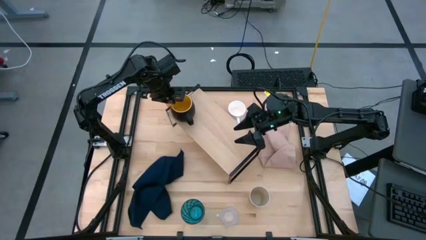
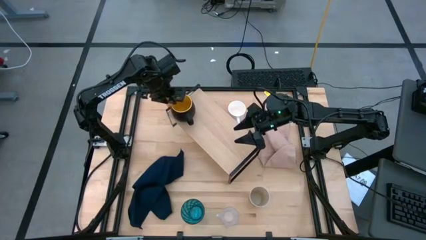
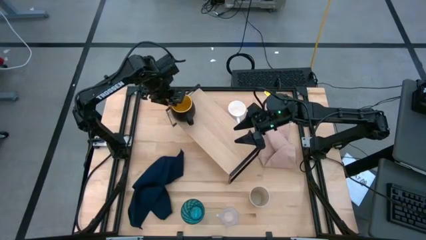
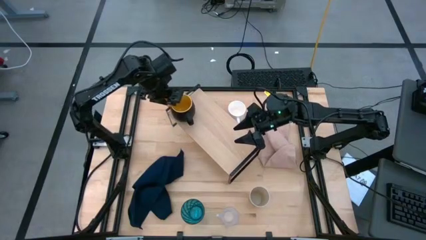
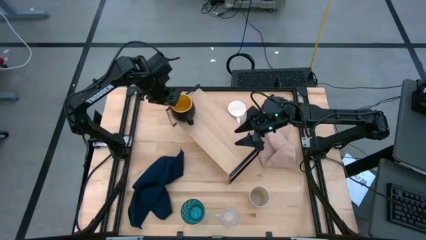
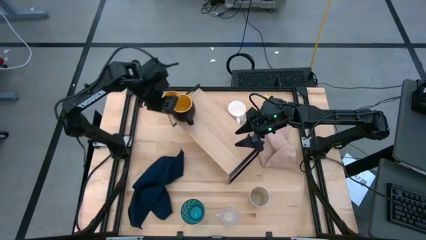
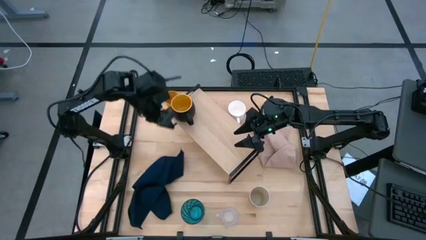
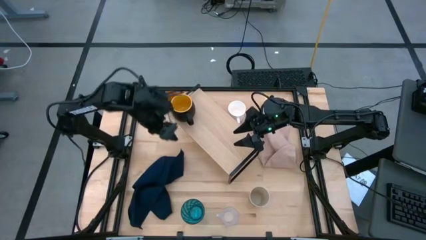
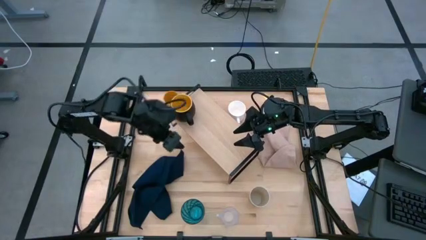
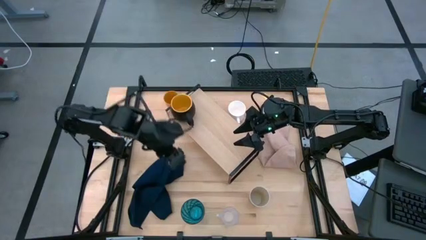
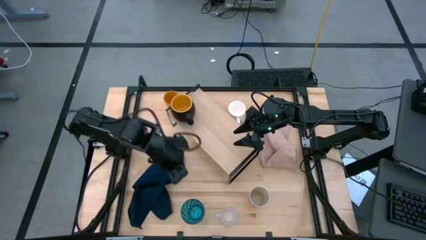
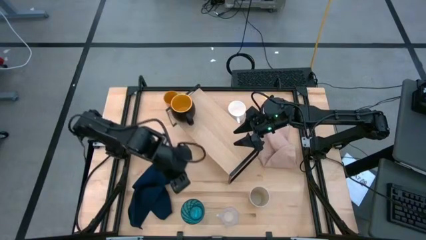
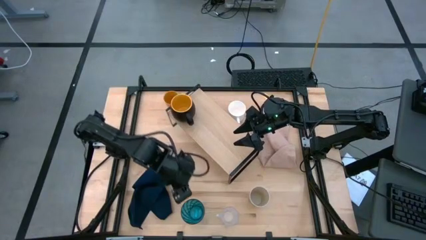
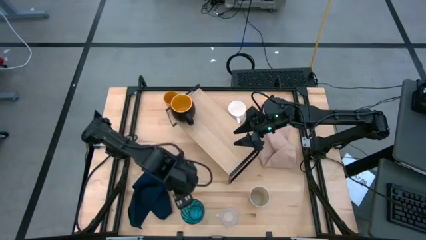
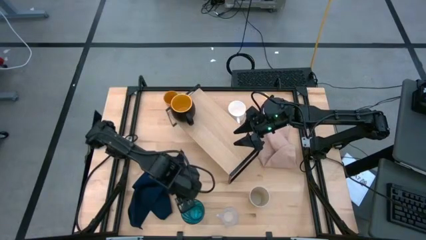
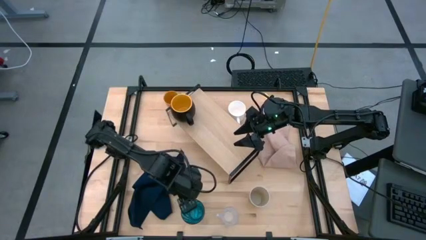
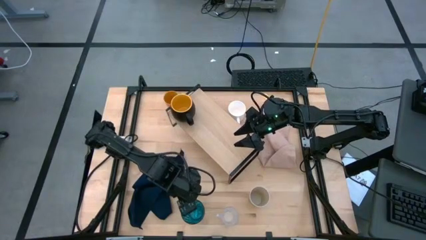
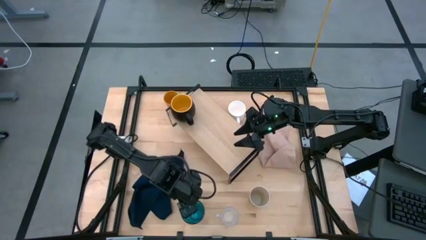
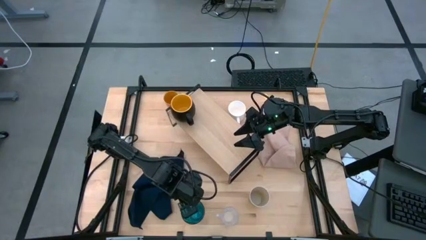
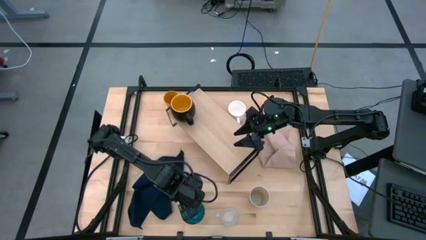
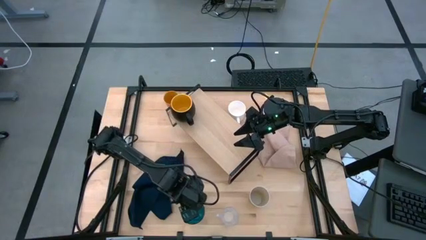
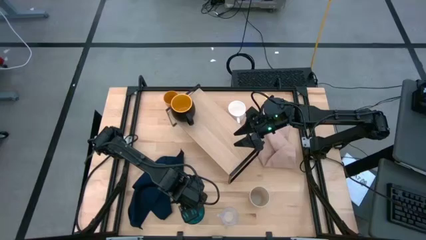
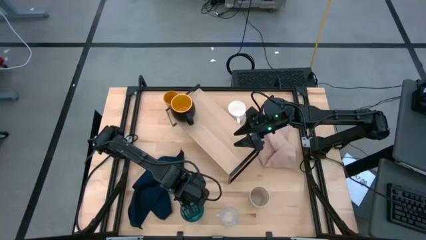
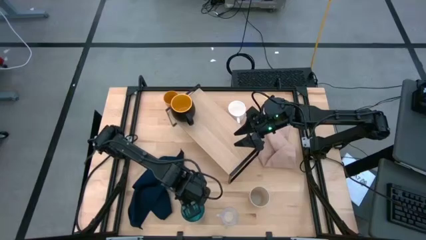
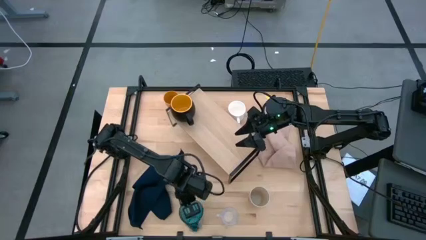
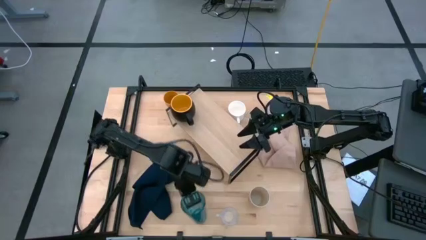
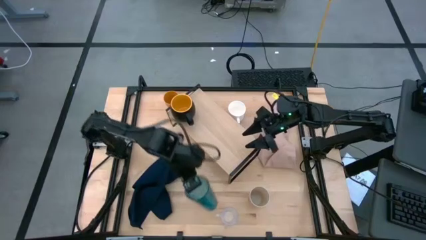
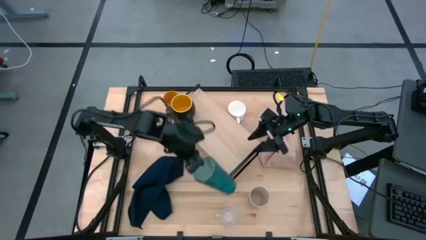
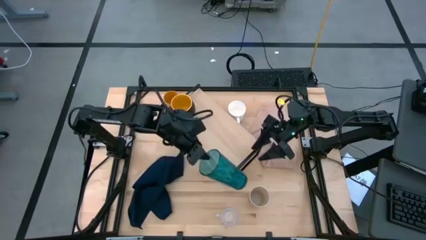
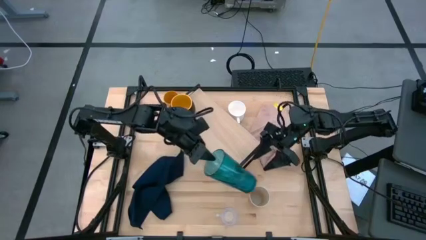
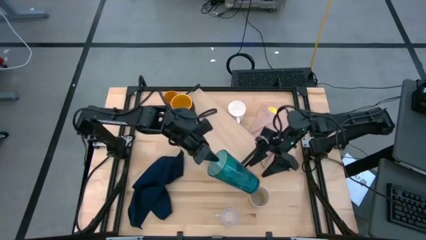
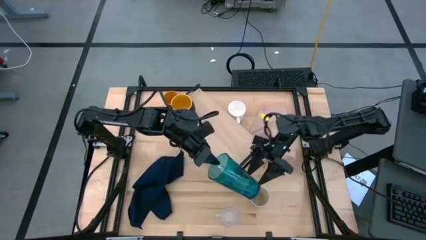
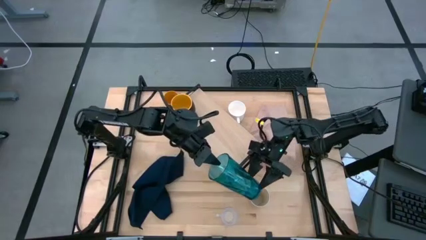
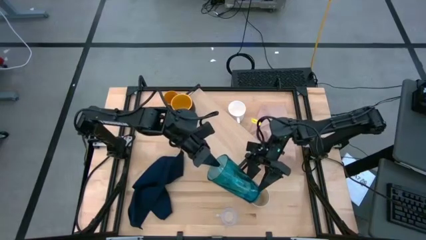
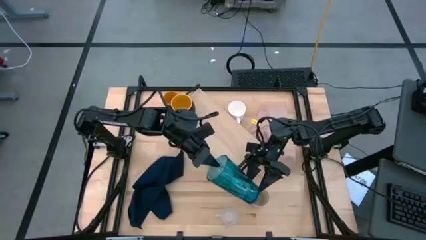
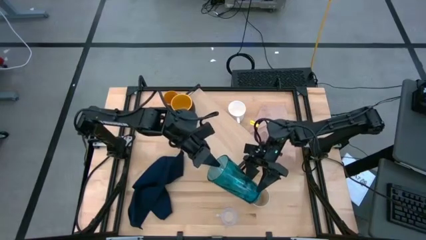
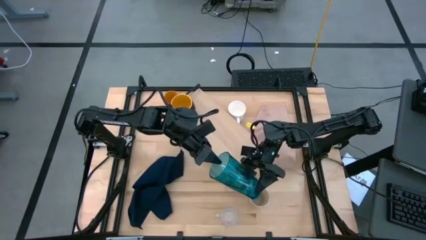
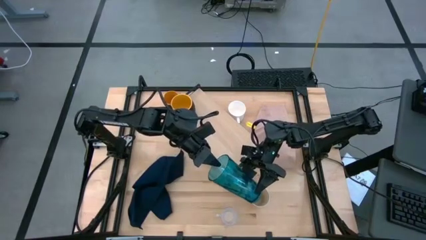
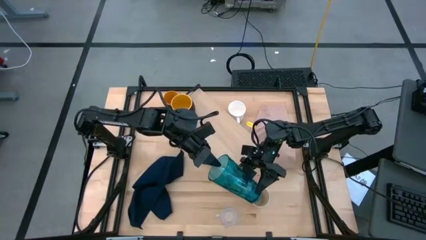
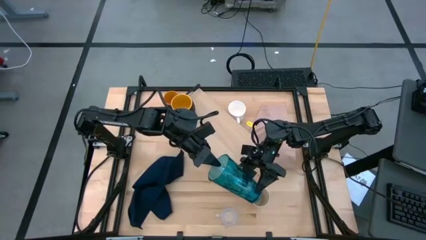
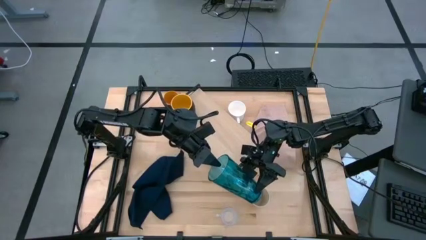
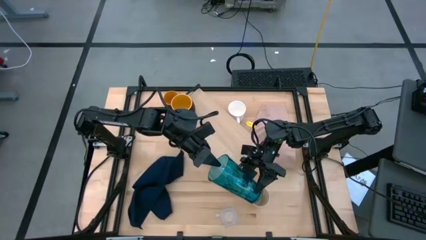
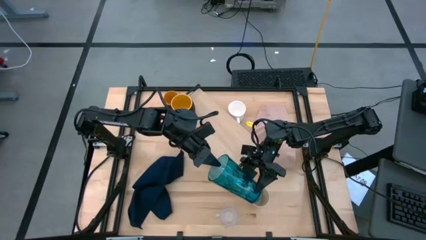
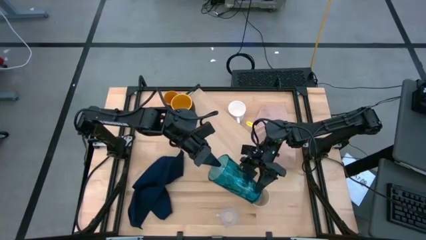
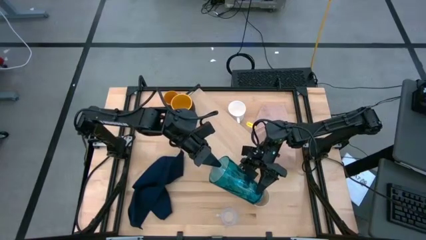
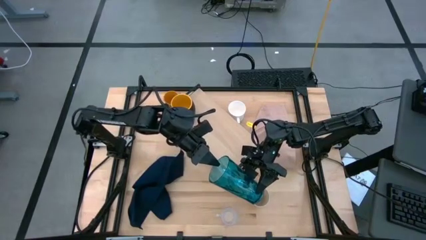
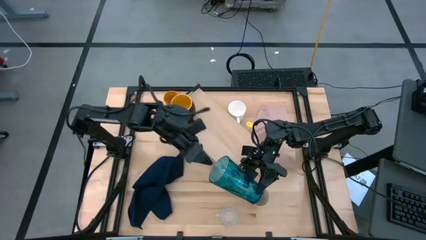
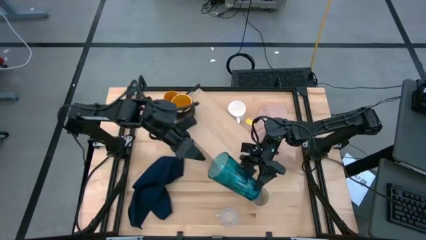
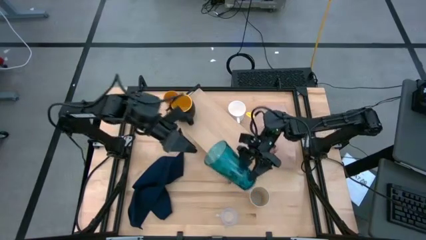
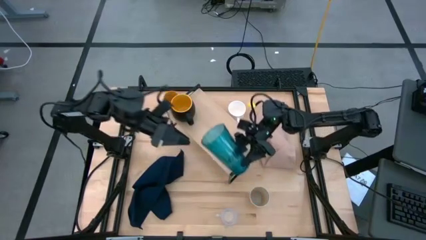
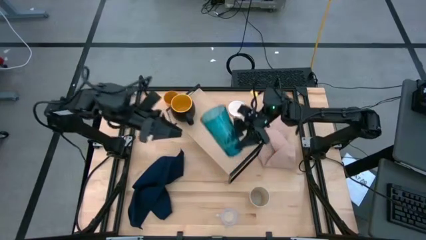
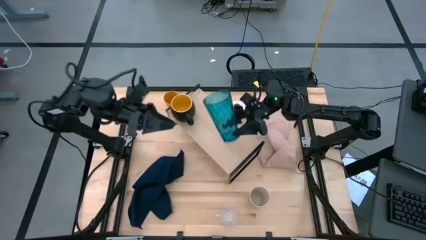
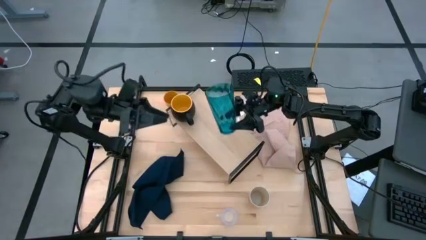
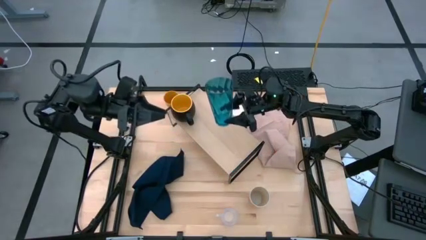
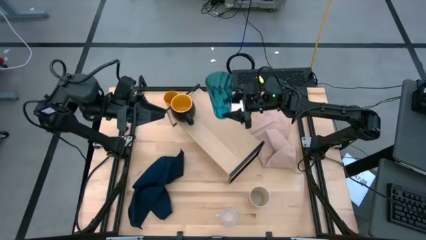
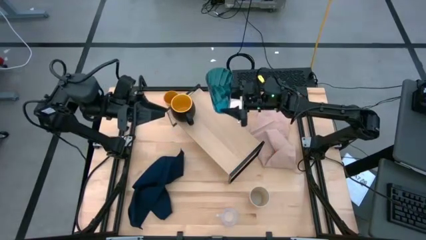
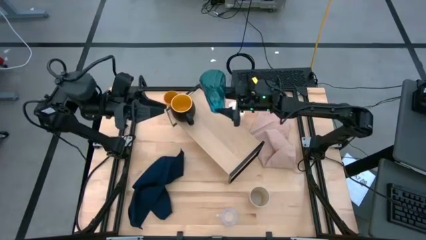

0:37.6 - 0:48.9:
Task: Stack small to large cups/mugs on shelf
Put the blue cup on the shelf
